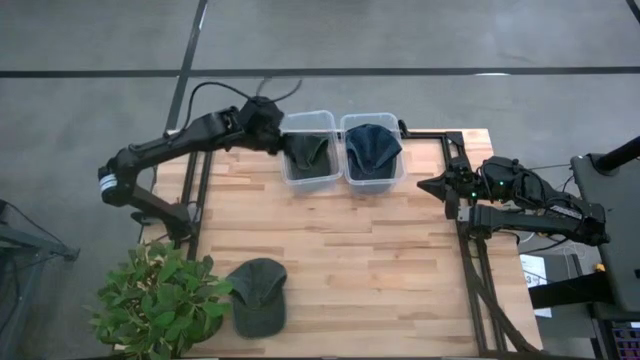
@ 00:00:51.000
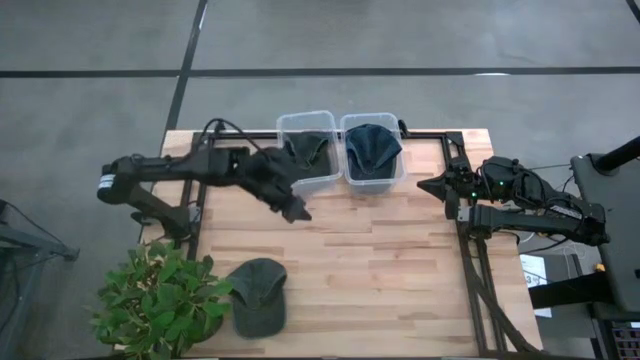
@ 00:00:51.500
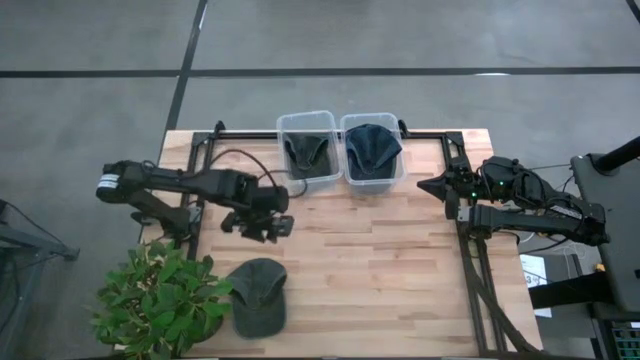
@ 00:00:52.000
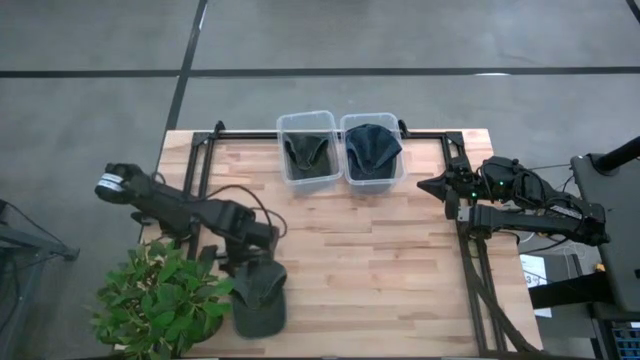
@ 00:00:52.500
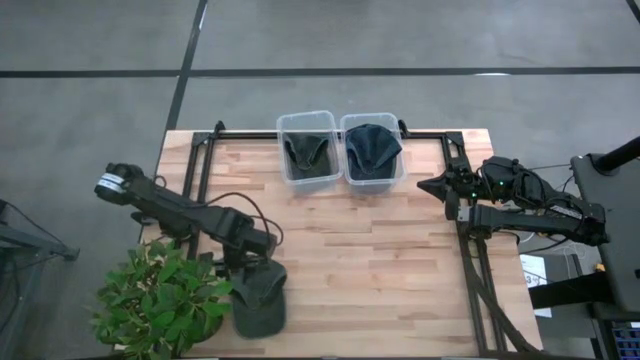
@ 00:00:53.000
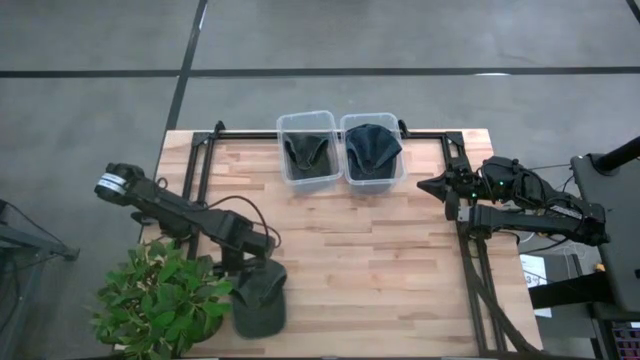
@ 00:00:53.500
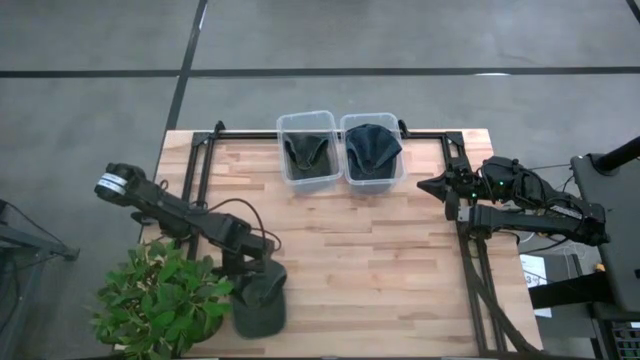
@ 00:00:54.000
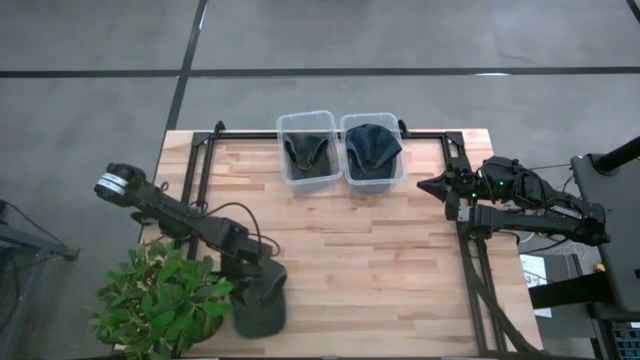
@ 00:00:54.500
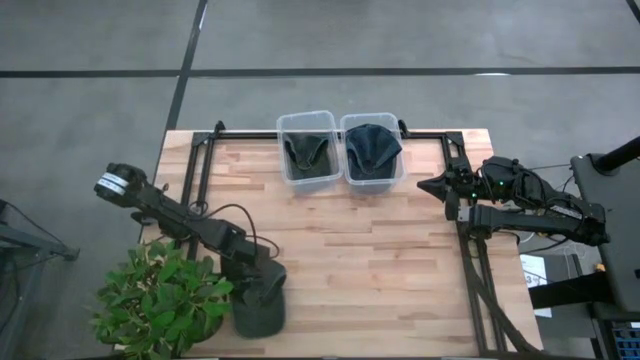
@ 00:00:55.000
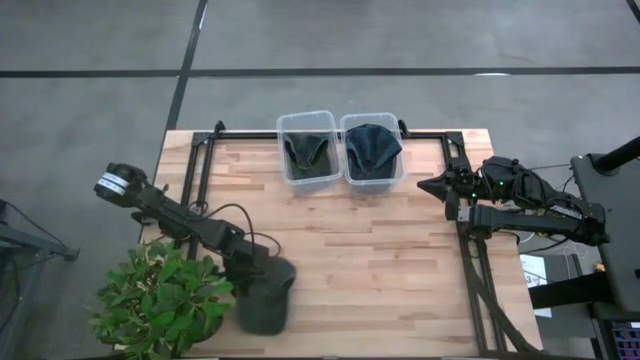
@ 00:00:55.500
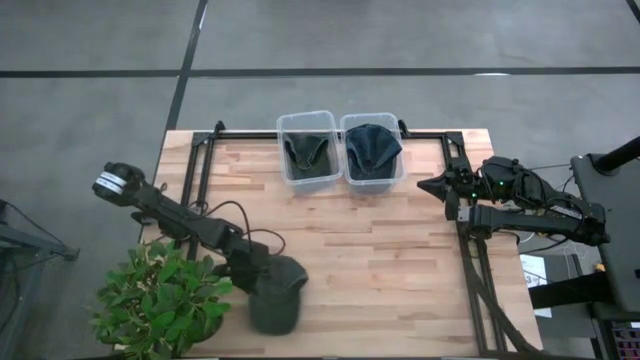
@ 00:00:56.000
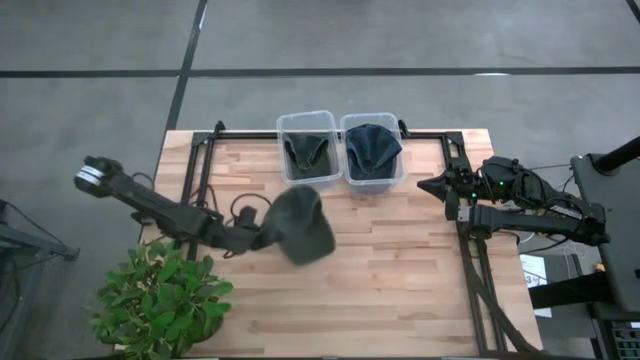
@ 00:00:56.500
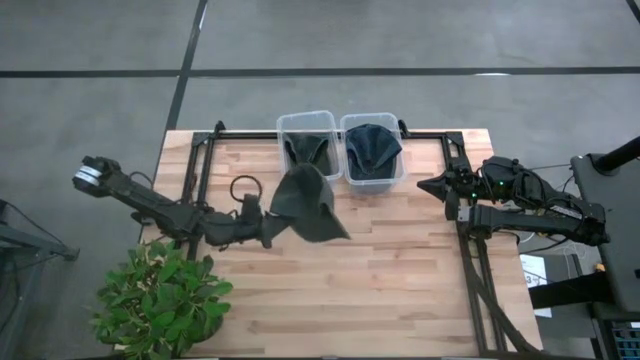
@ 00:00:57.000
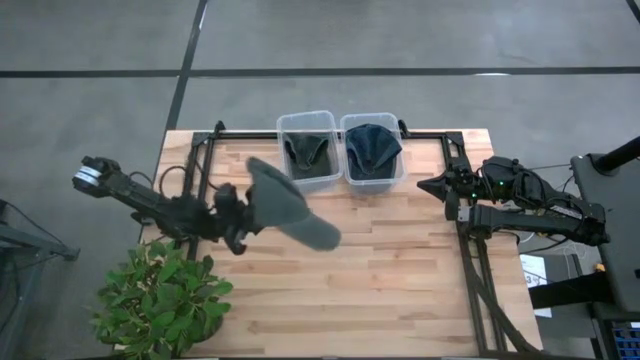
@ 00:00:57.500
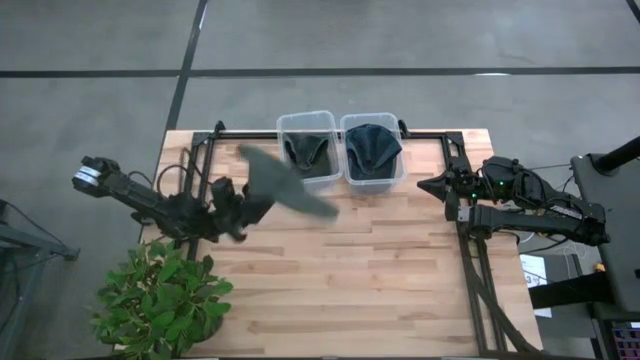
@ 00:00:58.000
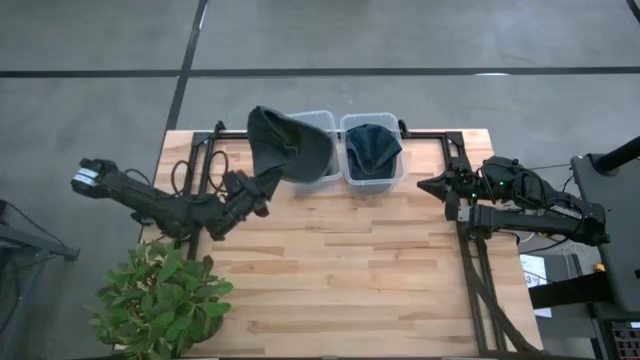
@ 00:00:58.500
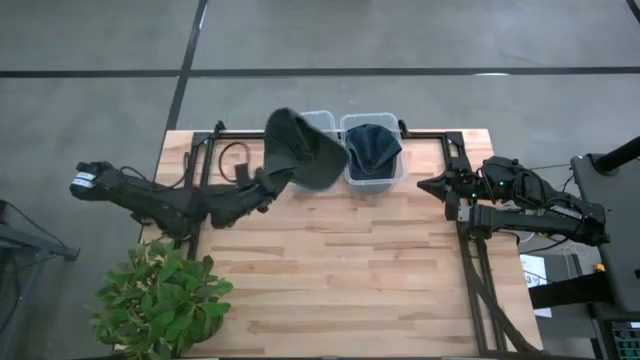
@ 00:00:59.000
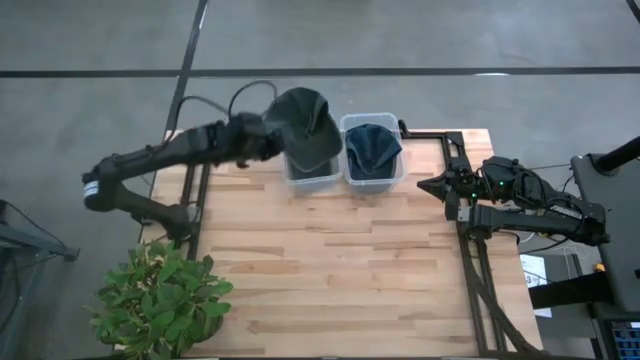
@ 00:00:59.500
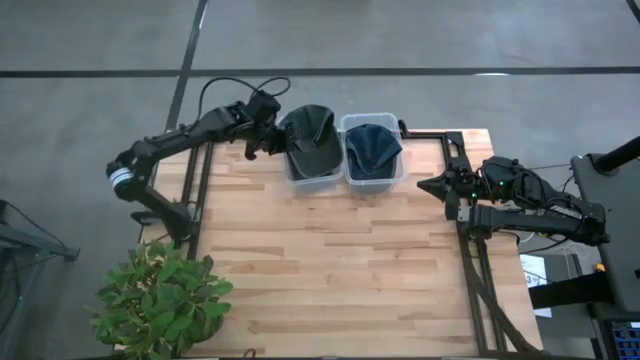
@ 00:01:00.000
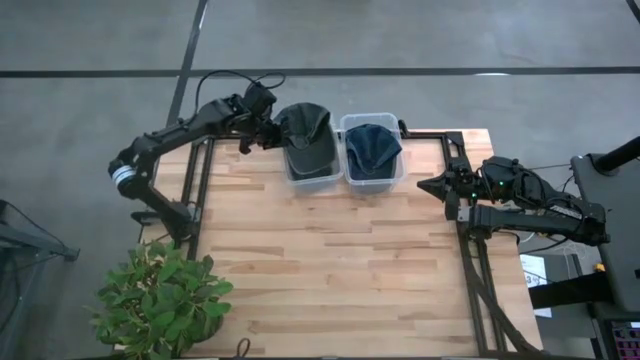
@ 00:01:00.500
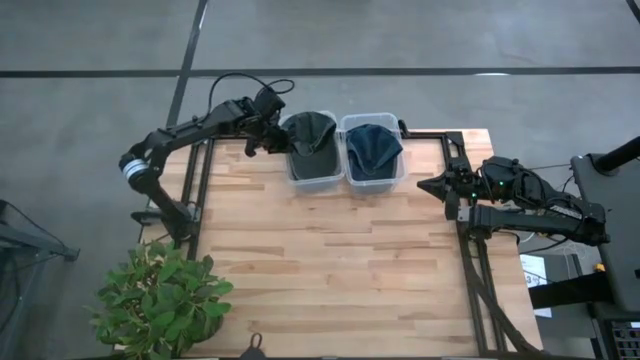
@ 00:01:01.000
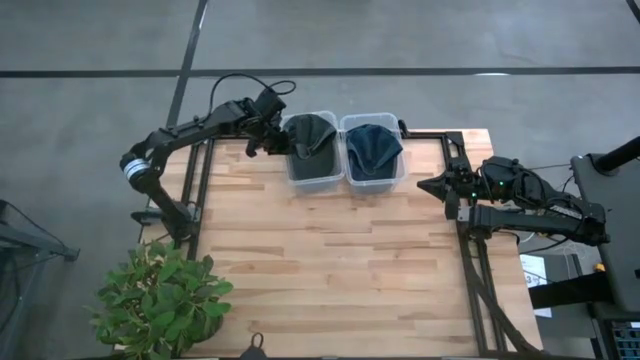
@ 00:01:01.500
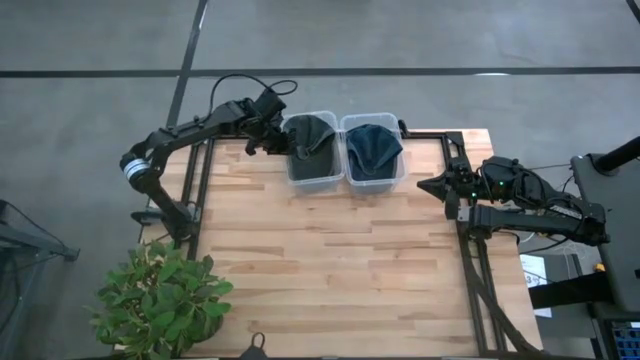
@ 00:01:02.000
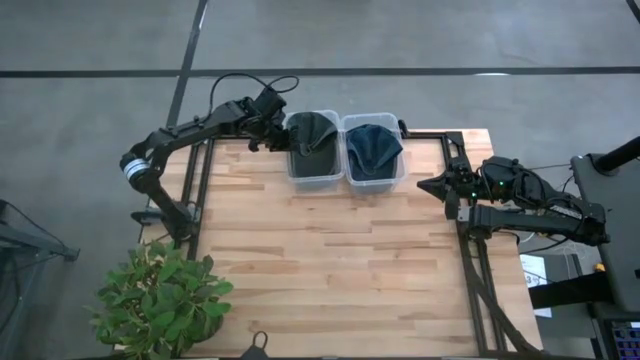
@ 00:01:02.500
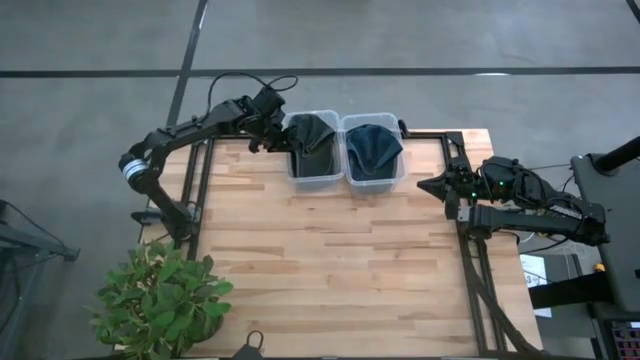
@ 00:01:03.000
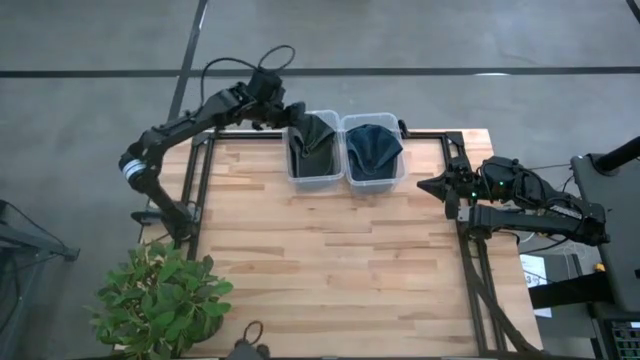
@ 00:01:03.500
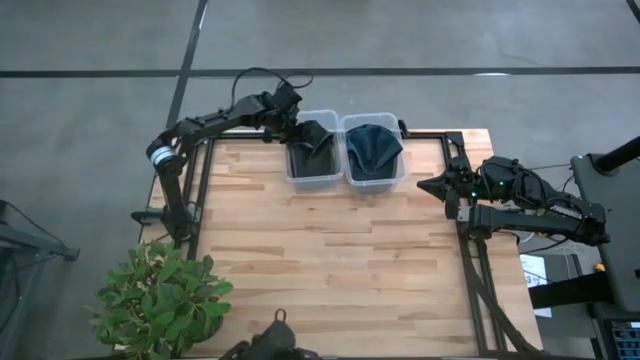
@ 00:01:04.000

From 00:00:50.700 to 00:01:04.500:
Task: Pick & Place hat
Put the green cap into the left transparent bin

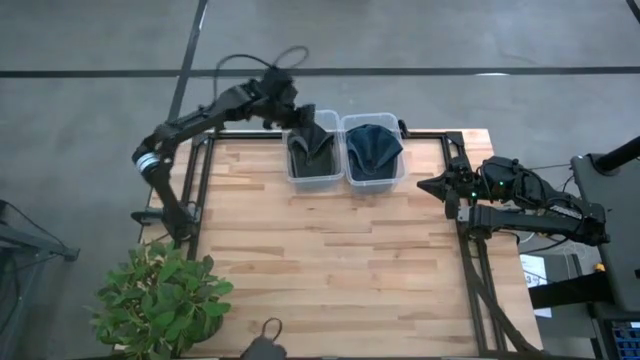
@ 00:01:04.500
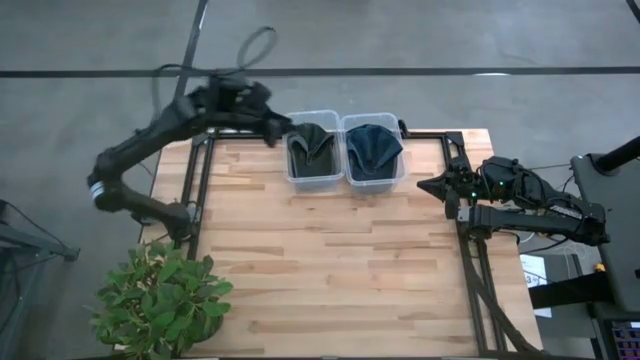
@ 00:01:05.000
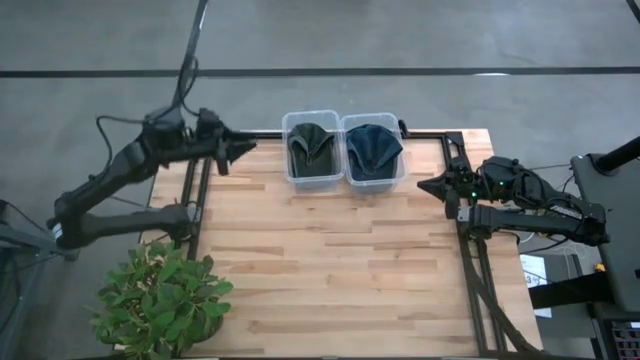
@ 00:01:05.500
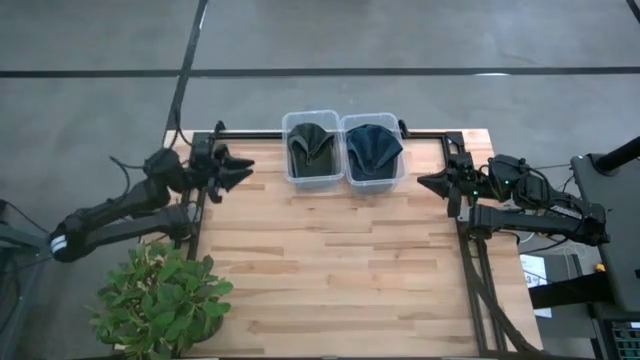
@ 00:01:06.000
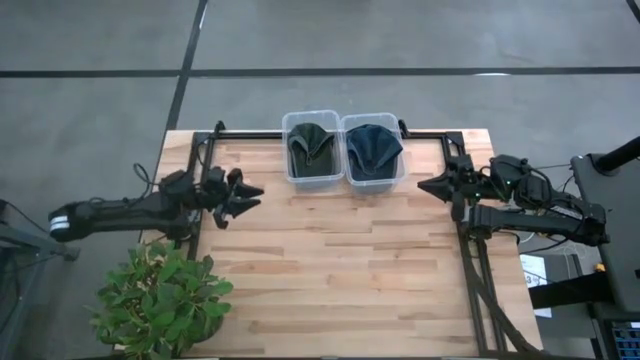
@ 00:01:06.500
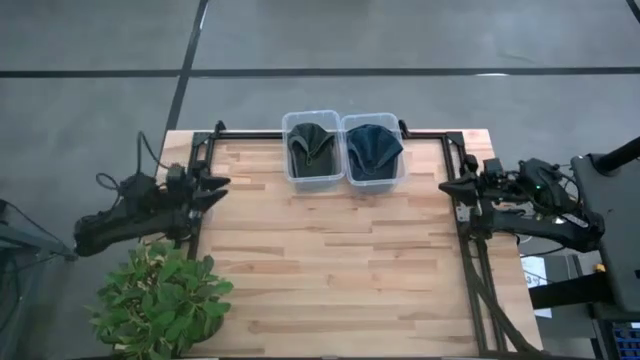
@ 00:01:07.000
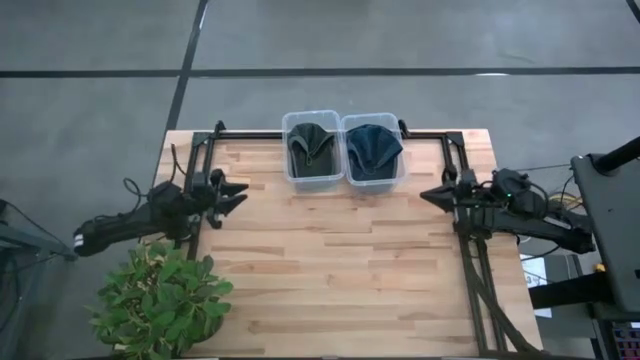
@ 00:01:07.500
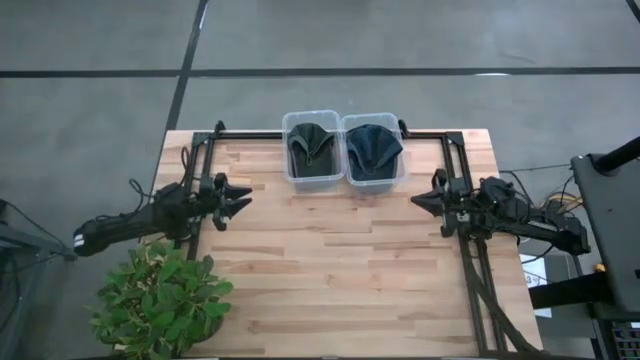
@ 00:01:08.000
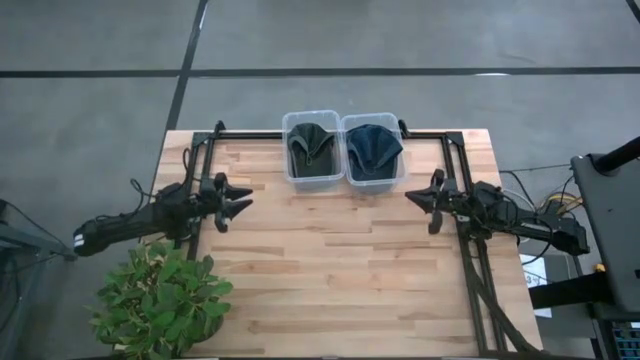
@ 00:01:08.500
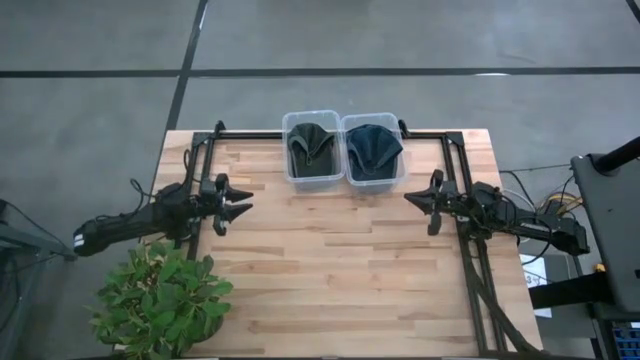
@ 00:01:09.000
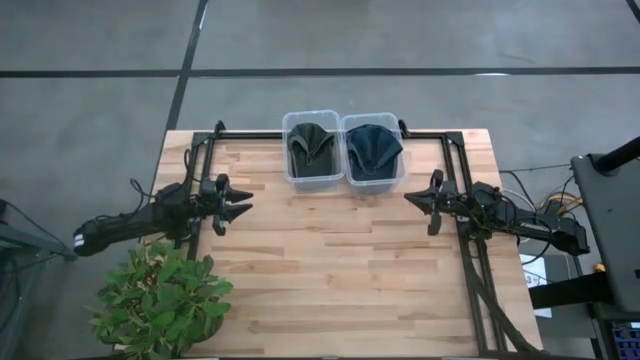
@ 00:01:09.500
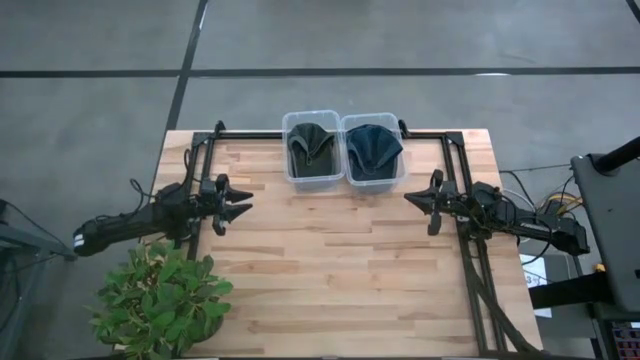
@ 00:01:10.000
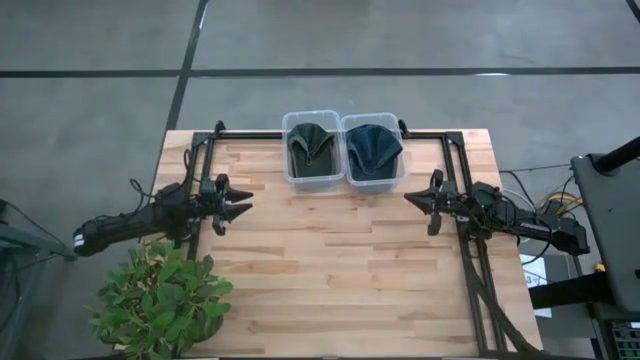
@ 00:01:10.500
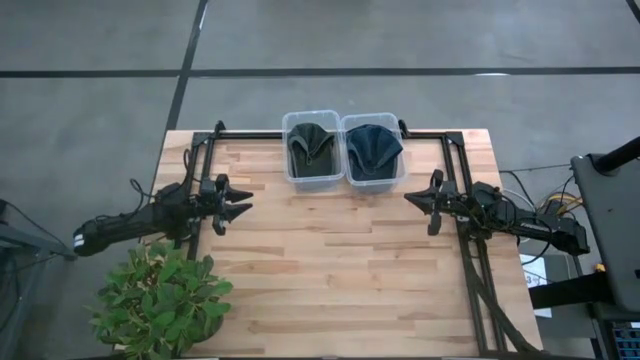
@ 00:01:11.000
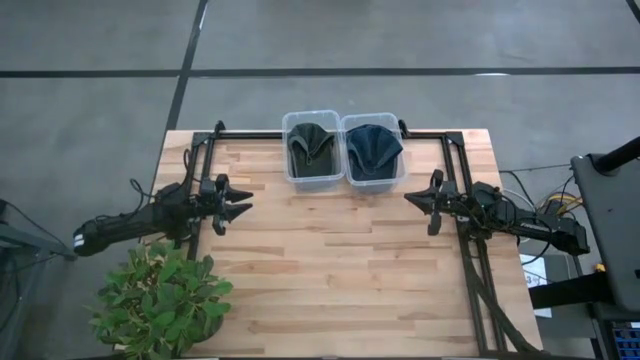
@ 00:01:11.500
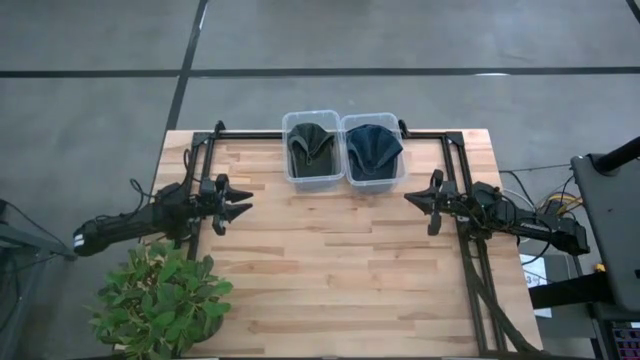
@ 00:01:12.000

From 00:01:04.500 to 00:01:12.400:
Return to Home Position
